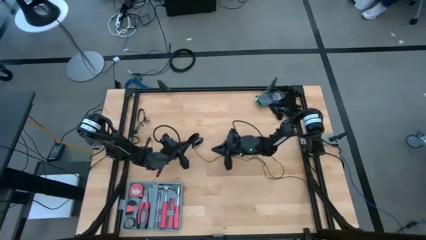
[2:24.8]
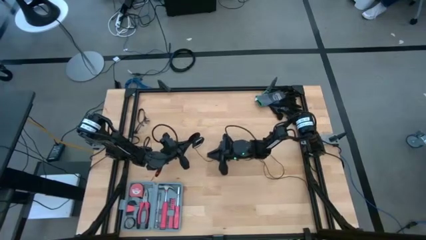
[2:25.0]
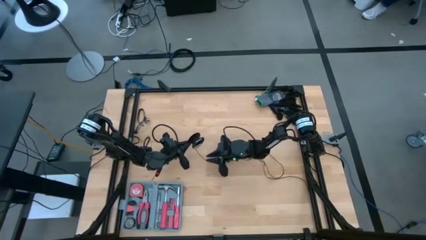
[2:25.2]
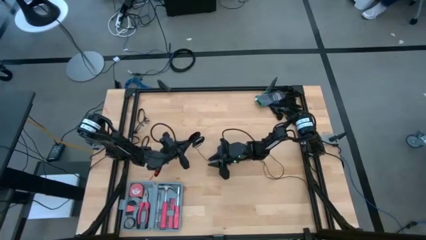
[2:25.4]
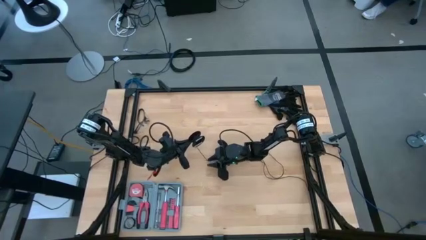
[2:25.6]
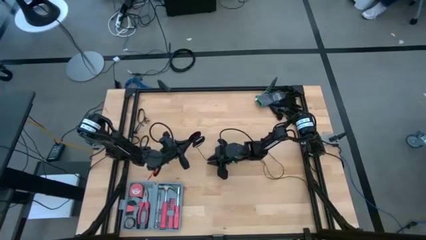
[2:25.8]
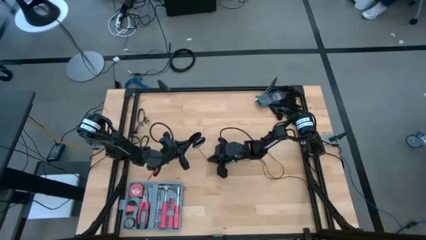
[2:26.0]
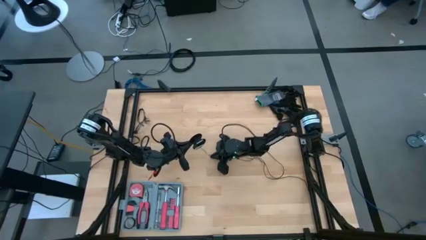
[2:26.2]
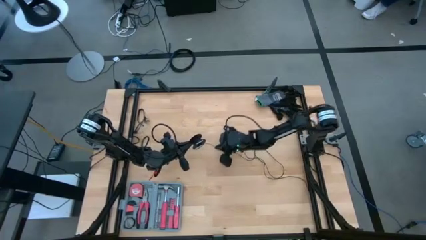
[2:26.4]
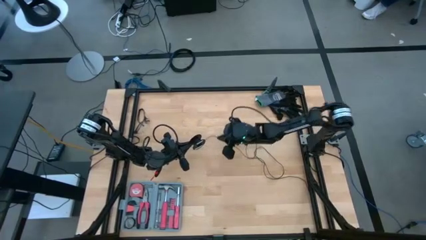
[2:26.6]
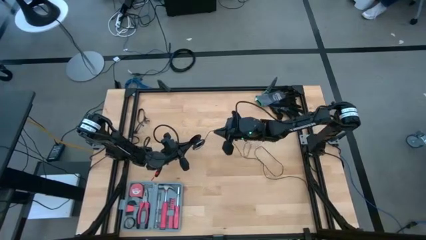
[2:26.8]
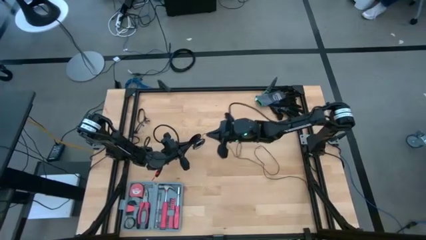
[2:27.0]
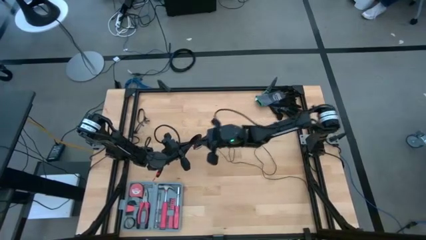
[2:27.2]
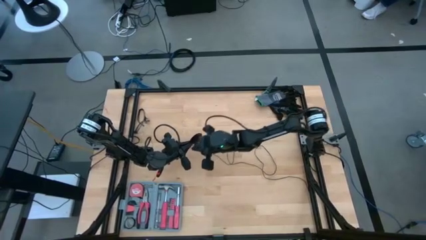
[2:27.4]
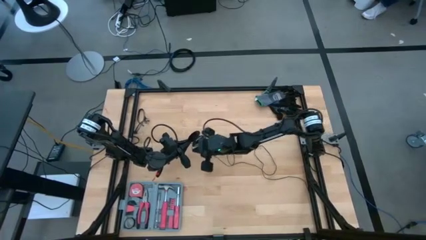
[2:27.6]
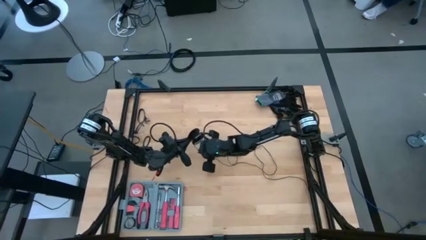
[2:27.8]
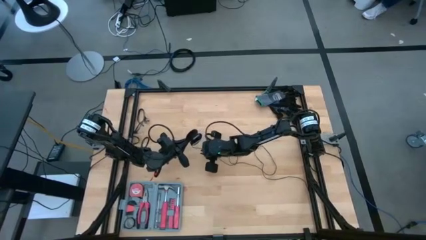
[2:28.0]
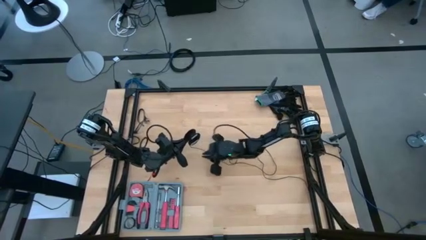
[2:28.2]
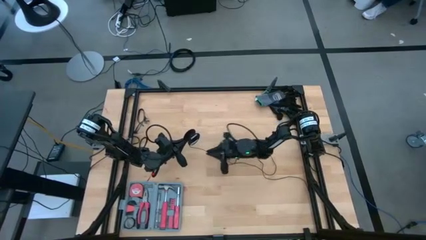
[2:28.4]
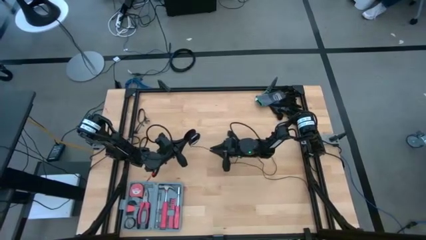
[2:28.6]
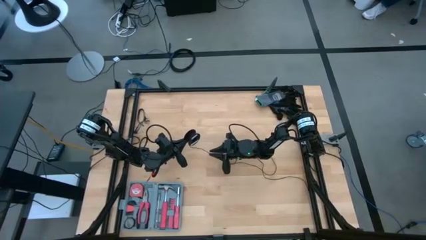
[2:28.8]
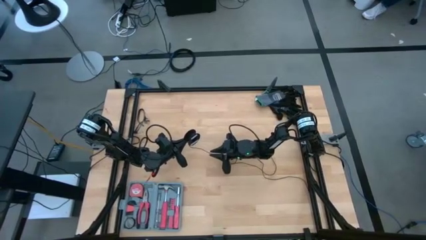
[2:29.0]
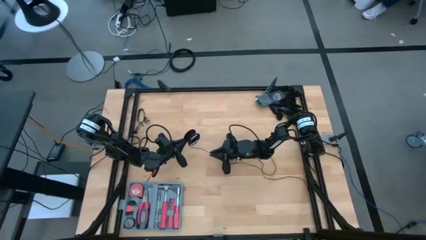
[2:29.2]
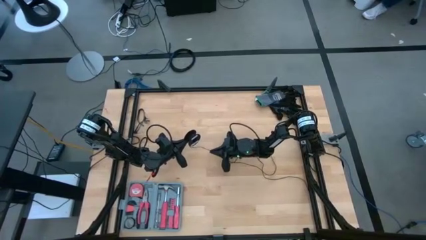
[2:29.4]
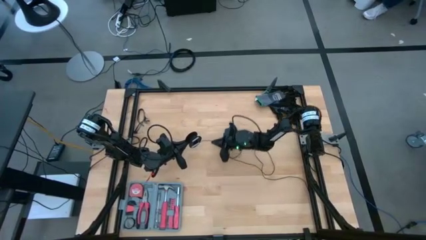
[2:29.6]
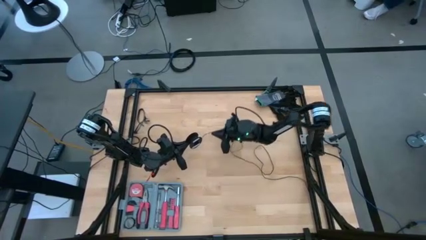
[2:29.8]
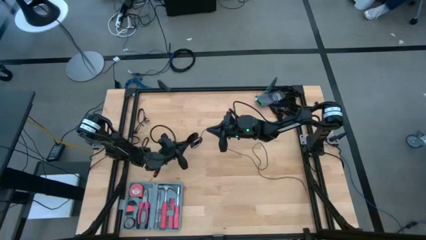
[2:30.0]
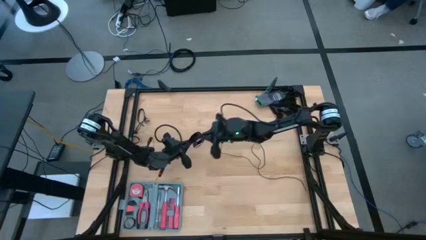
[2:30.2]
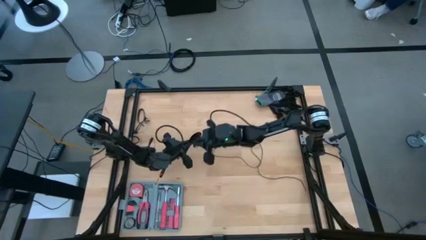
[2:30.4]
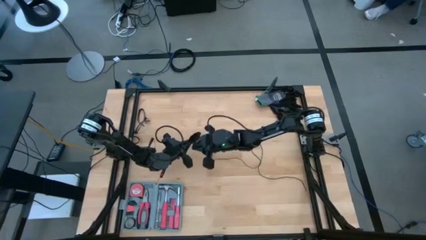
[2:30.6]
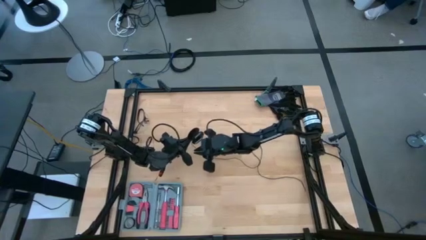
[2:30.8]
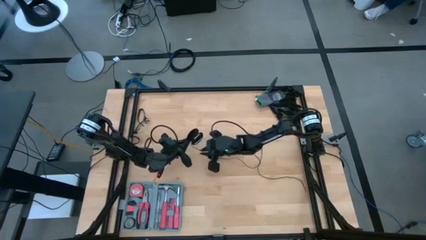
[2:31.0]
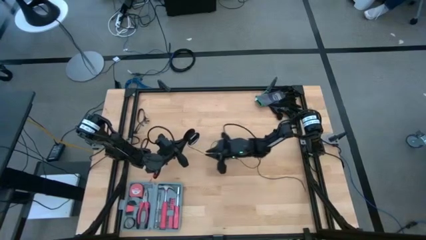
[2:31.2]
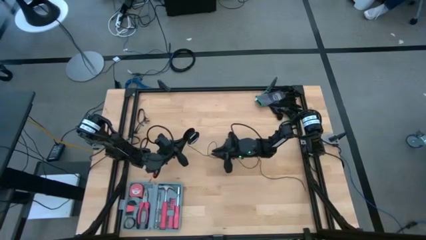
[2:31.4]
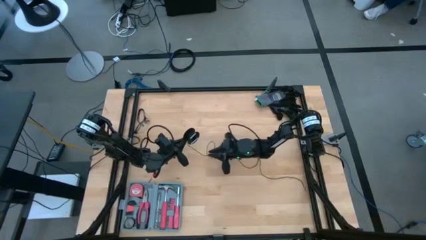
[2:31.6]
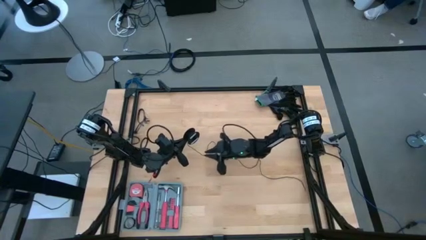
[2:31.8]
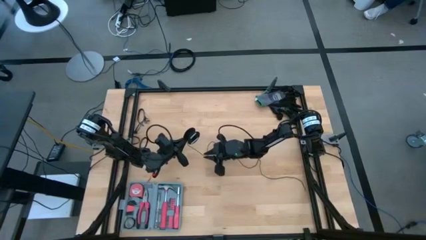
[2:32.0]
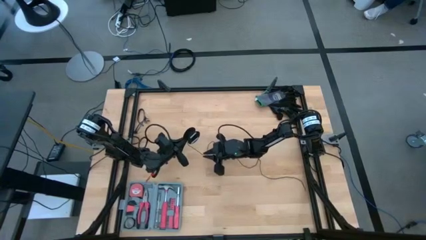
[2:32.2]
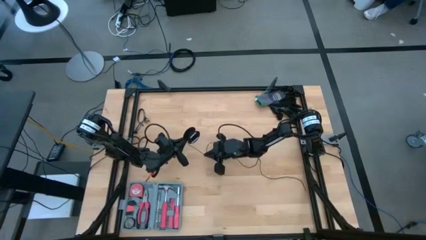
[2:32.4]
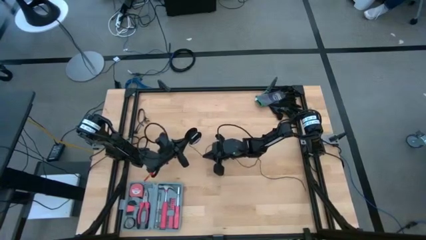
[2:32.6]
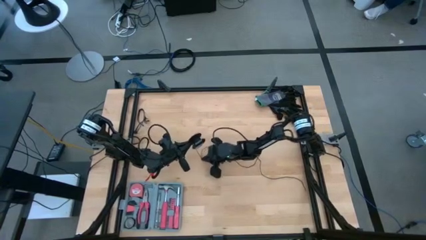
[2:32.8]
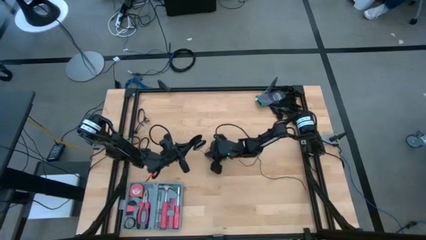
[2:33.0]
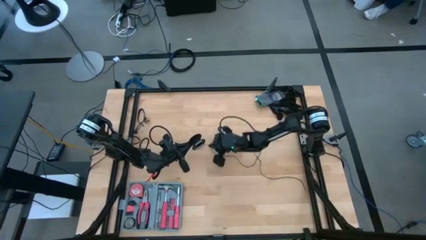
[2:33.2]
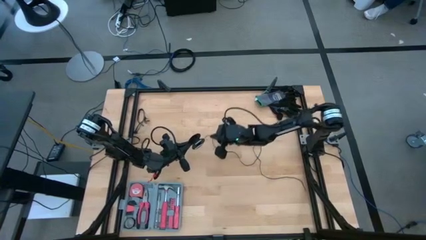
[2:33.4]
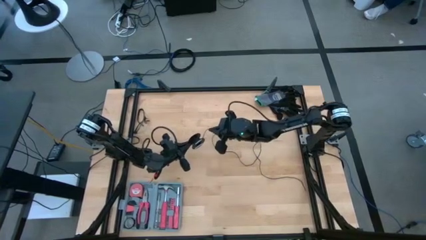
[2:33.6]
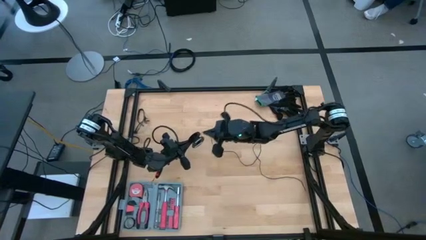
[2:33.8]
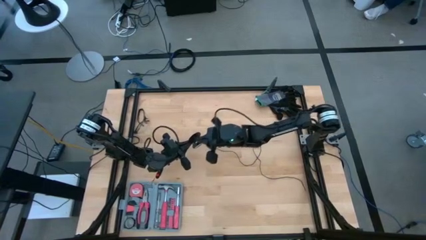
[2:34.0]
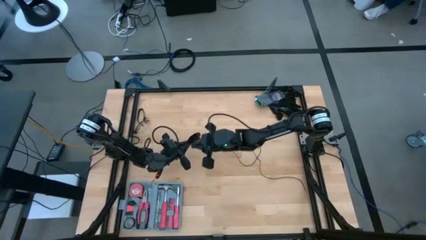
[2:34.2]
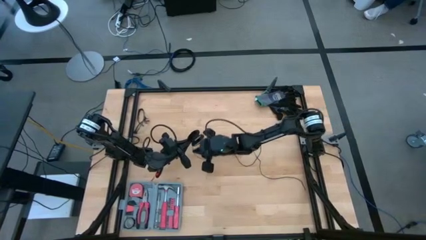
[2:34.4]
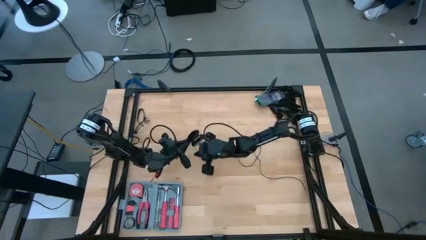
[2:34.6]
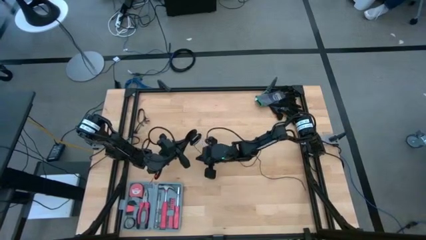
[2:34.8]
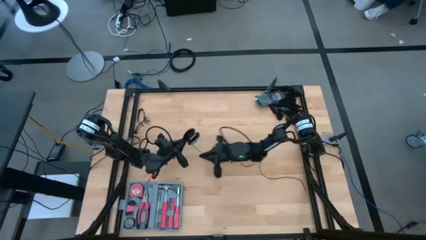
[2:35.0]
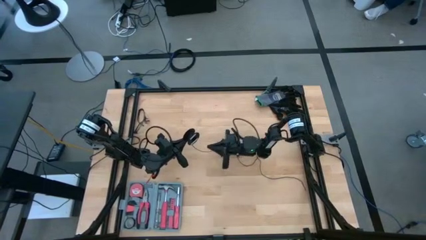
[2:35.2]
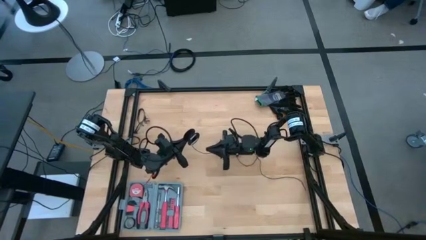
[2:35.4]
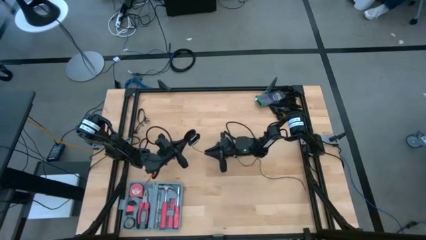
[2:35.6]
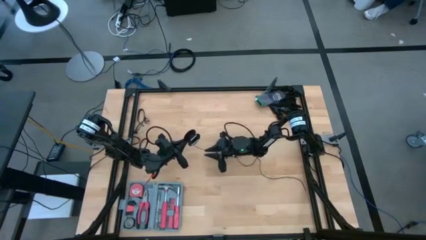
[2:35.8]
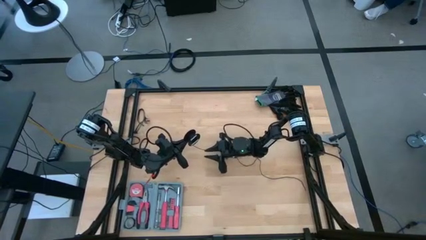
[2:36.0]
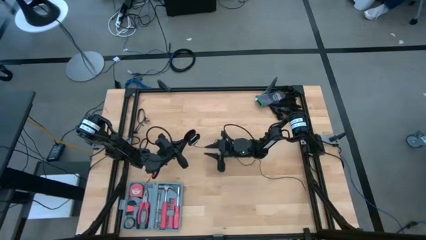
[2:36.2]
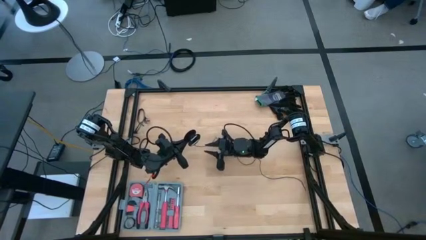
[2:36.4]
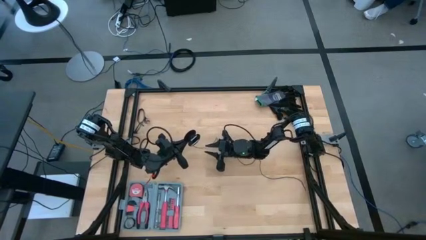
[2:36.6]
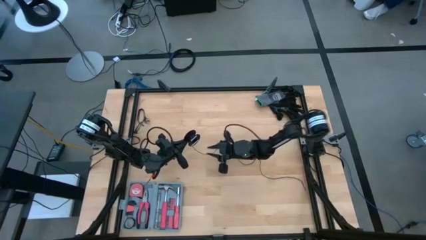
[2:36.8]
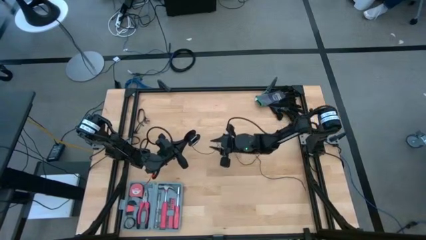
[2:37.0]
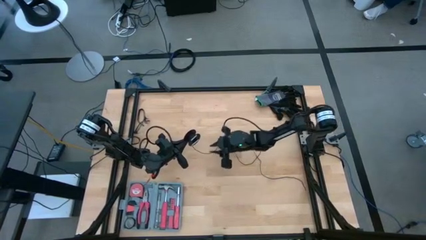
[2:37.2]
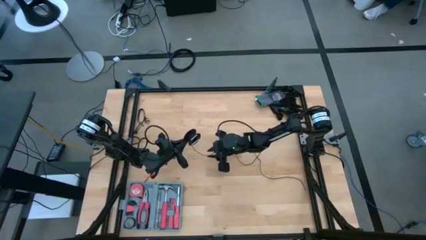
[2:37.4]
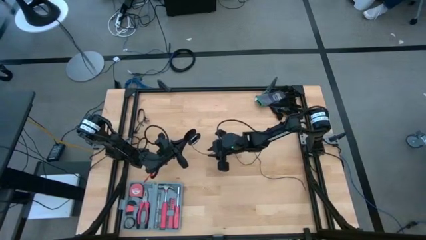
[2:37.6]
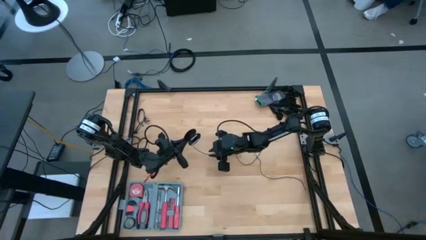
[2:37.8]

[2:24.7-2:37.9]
Task: Coil cords
Coil the black wire onto the spool
